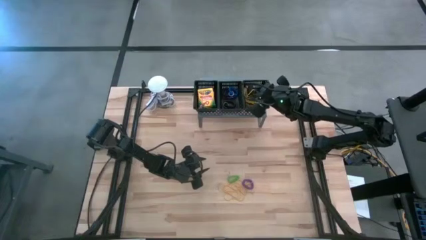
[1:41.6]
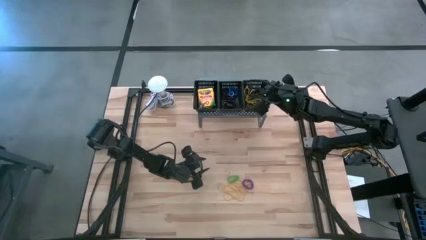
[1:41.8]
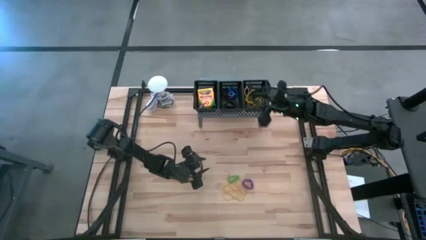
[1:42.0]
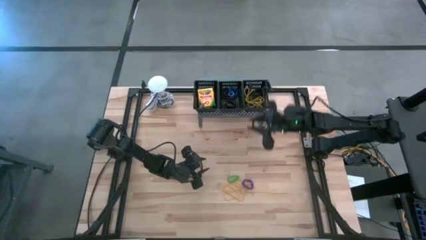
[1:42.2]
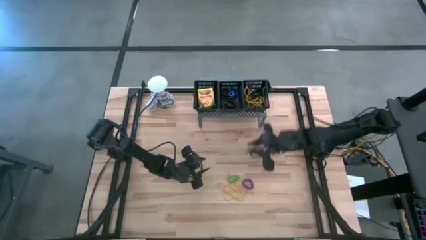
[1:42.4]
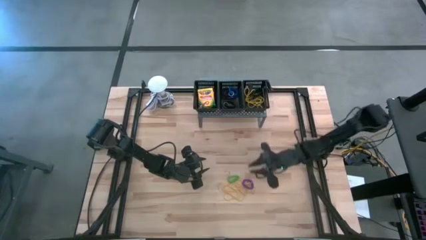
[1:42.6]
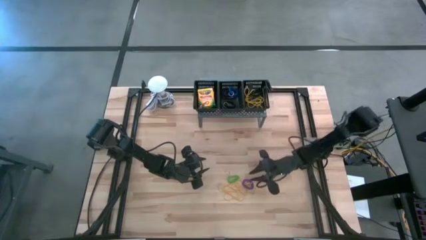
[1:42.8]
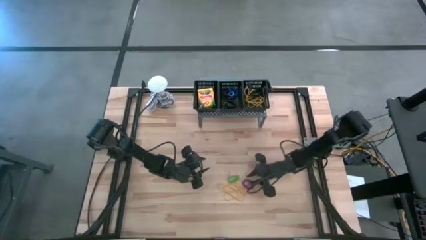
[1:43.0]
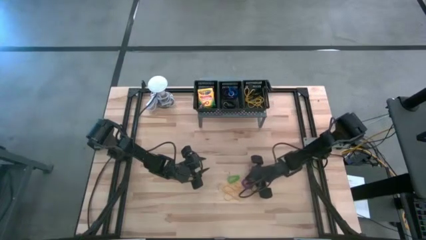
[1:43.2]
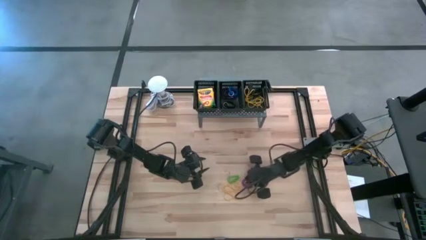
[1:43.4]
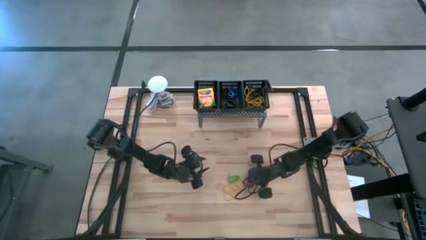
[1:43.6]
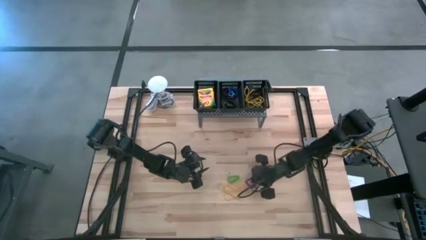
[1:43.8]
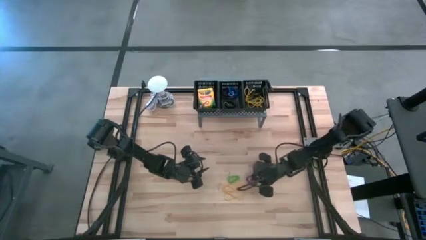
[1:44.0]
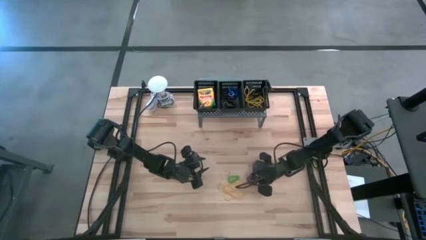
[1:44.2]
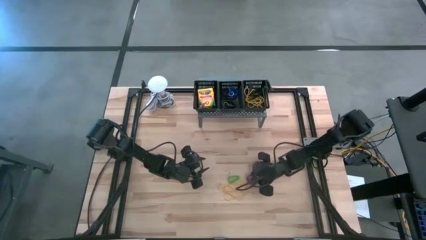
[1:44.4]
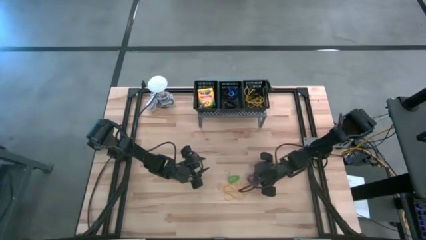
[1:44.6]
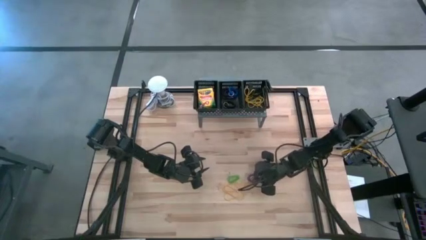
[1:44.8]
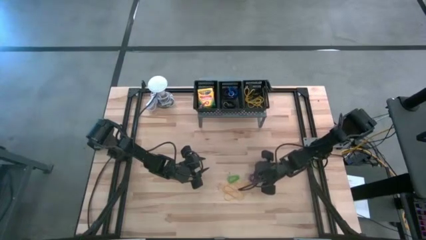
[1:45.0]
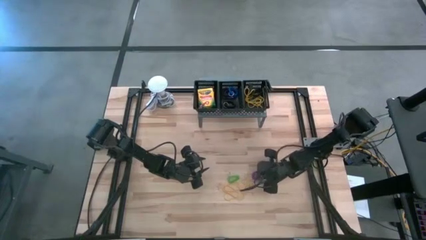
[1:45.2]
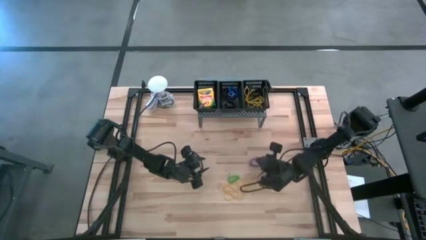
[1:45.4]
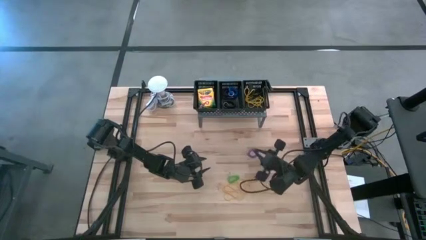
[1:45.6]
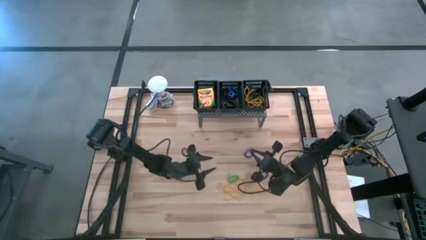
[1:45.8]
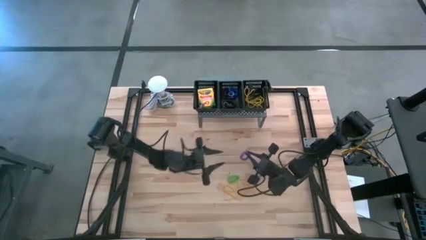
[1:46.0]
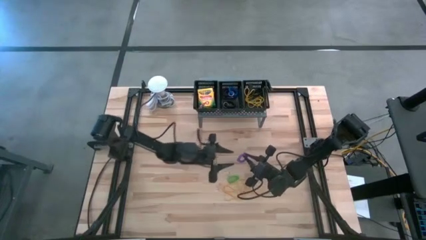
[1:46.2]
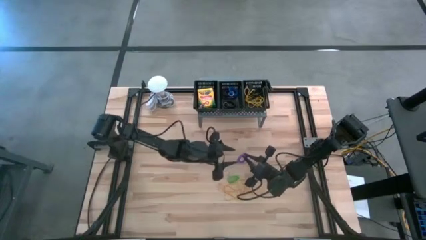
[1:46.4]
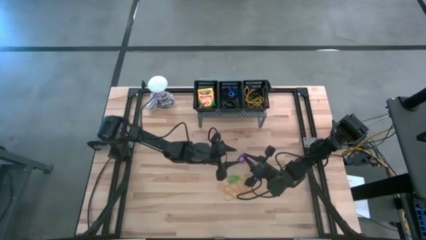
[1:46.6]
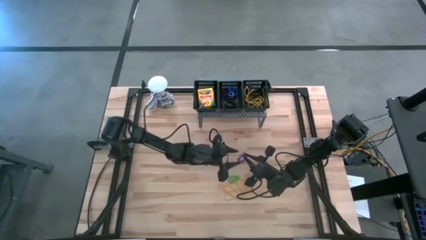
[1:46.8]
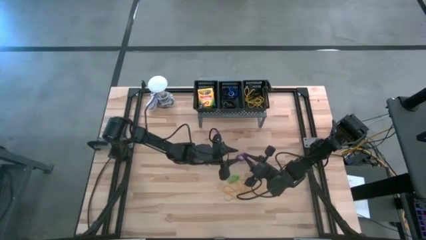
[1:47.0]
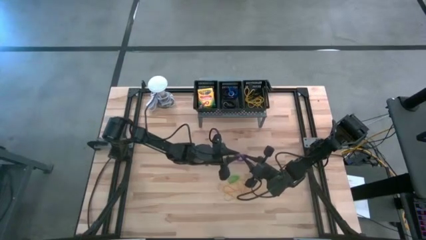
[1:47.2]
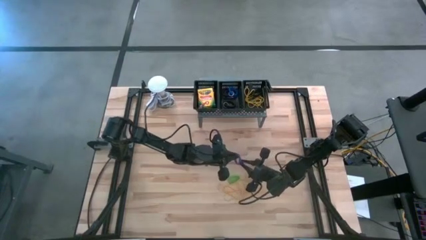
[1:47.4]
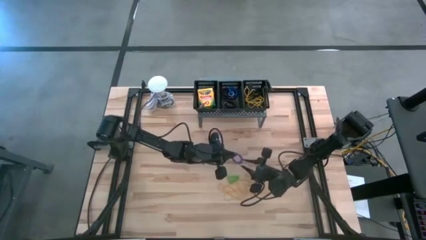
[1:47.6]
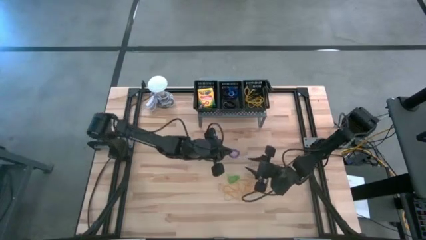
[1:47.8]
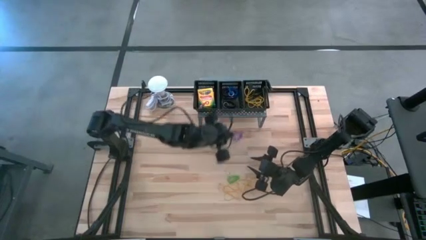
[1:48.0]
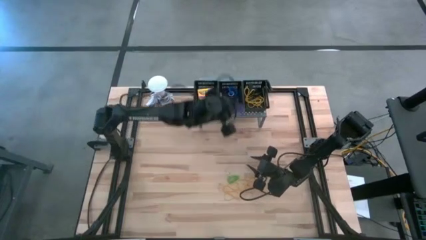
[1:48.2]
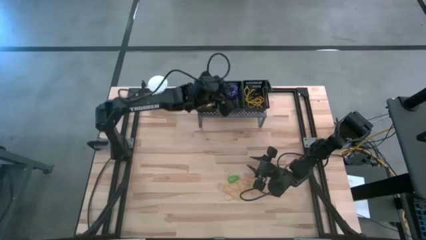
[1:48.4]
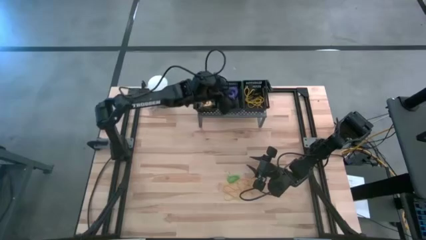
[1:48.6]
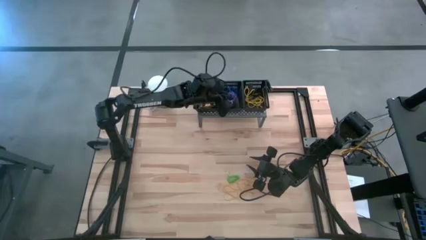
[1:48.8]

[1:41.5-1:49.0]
Task: Pick & Place Office Desk Supplies
Put the violet spring keychain into the middle black bin on the shelf

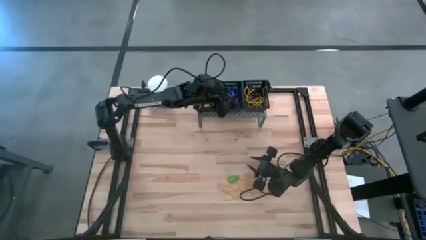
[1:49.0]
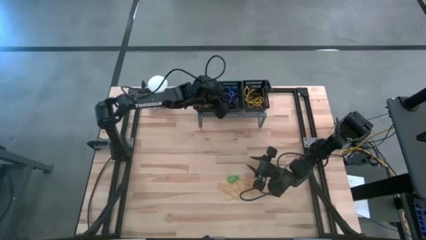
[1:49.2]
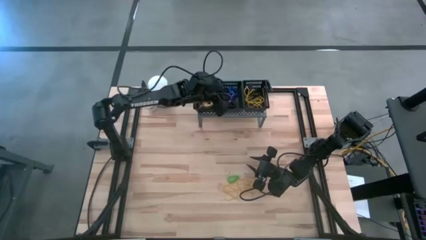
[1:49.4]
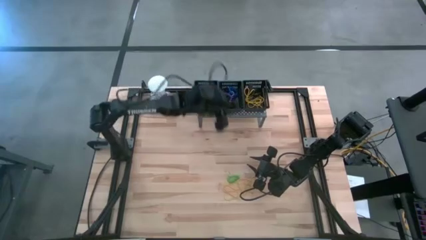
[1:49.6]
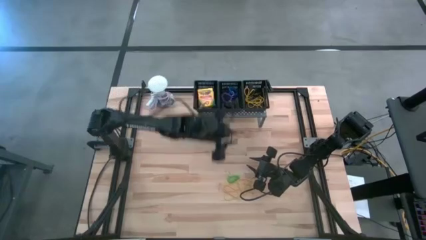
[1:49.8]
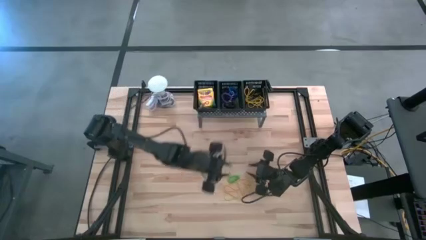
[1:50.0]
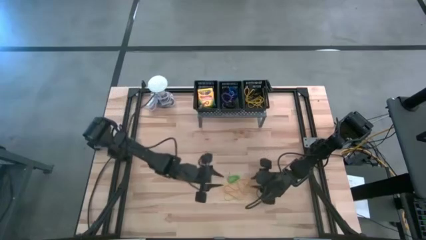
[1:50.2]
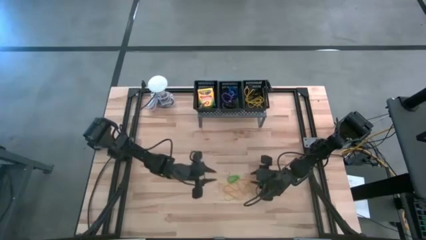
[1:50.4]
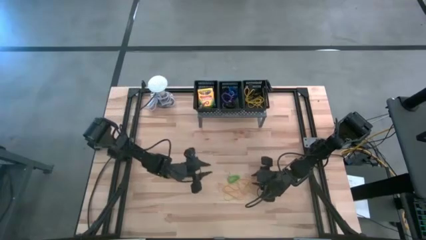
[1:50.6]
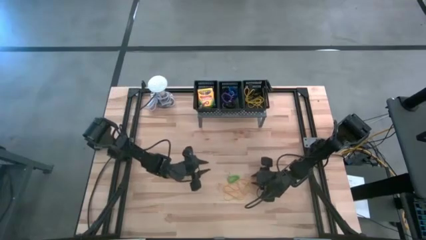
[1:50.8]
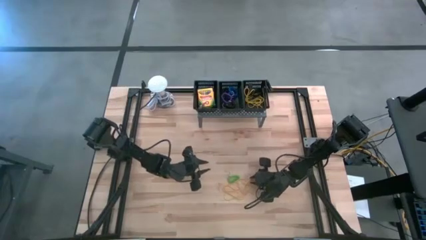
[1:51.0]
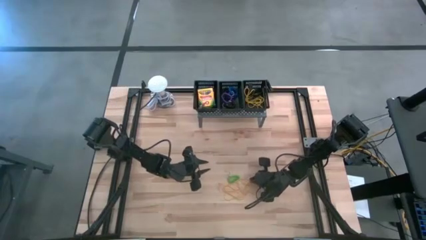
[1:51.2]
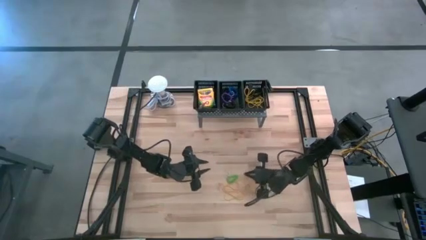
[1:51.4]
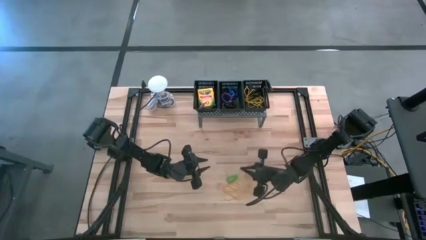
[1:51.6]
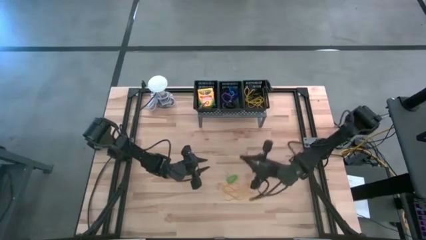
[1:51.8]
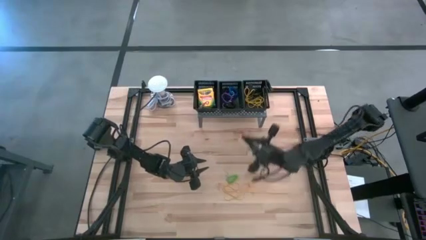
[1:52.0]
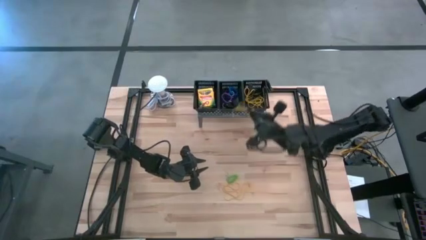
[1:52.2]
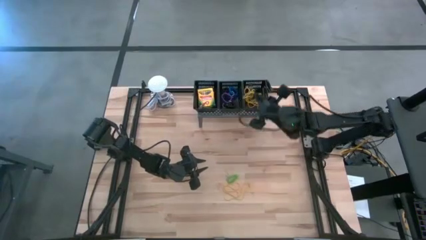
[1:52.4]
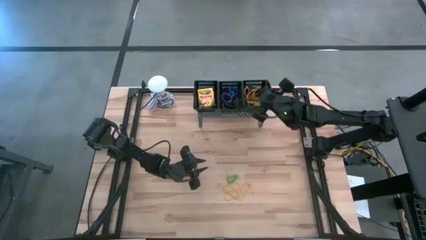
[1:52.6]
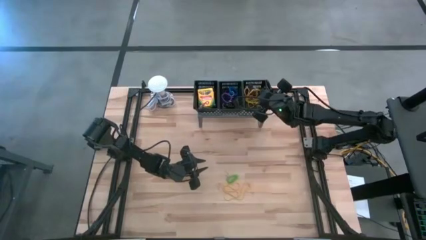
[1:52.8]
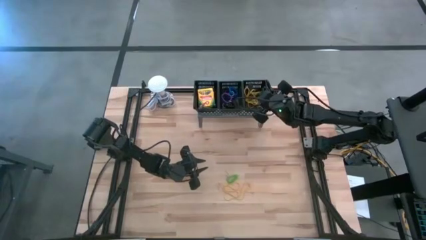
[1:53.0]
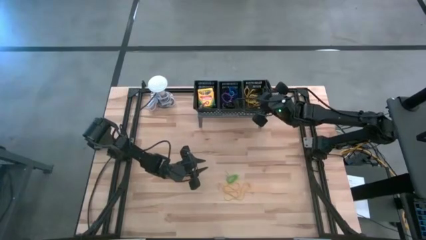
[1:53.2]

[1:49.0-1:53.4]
Put the yellow rubber band into the right black bin on the shelf

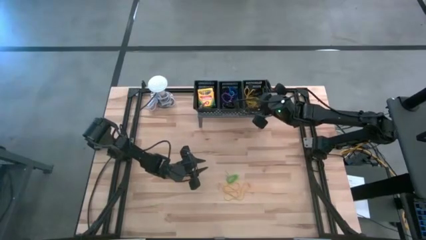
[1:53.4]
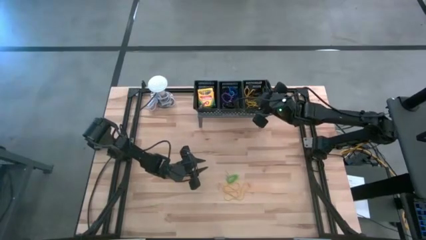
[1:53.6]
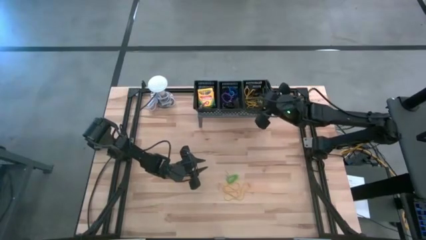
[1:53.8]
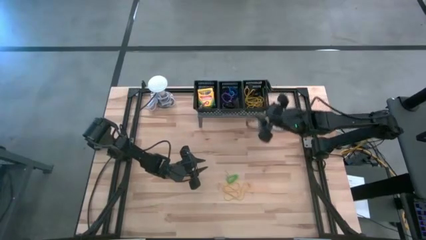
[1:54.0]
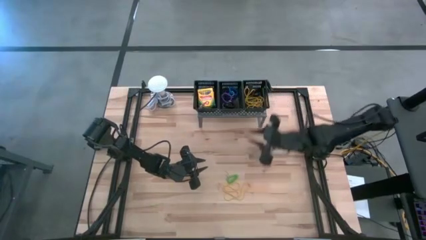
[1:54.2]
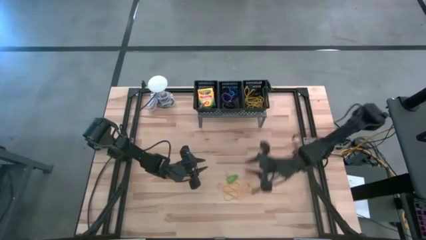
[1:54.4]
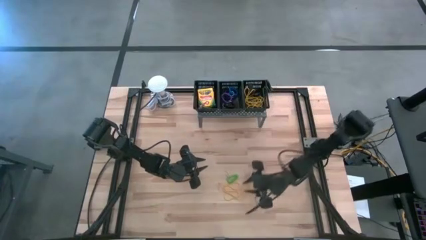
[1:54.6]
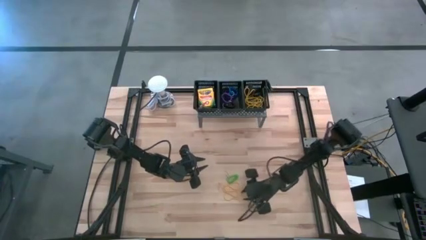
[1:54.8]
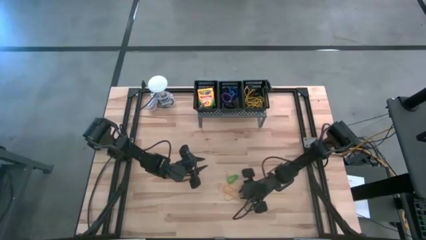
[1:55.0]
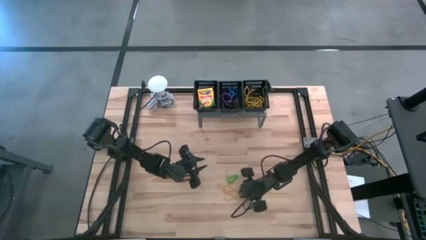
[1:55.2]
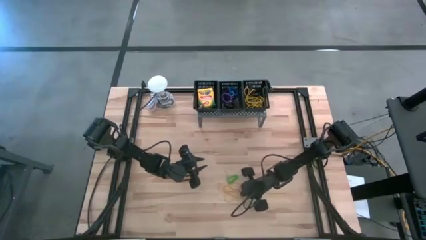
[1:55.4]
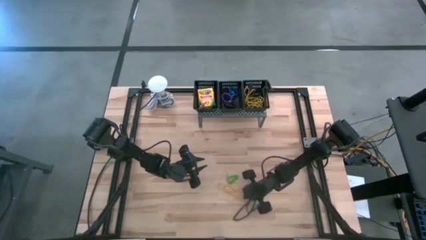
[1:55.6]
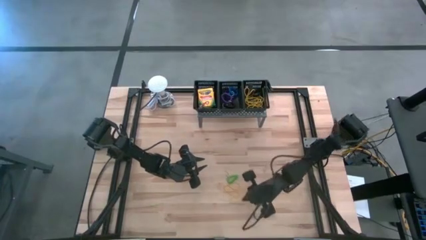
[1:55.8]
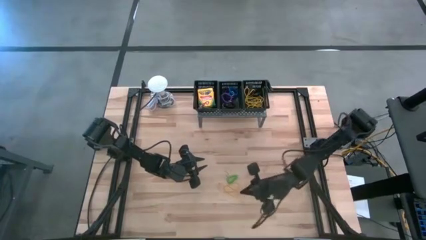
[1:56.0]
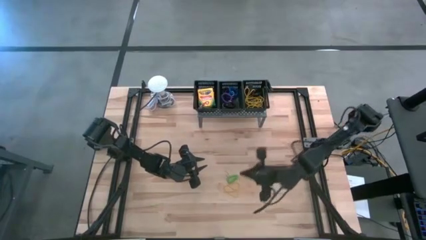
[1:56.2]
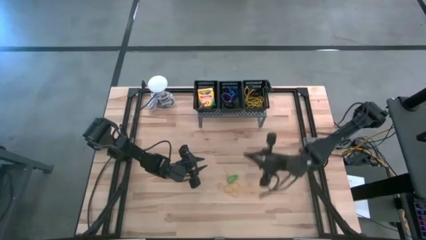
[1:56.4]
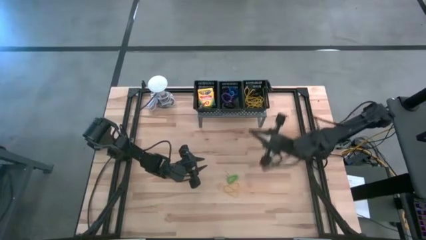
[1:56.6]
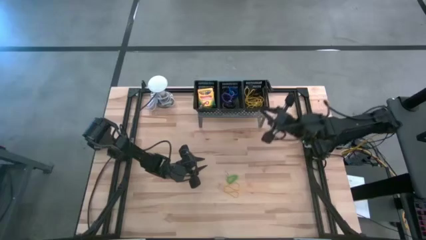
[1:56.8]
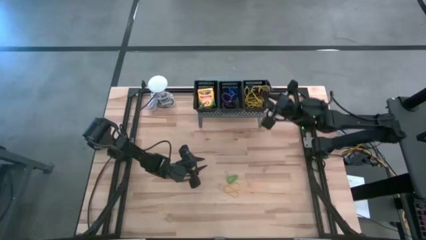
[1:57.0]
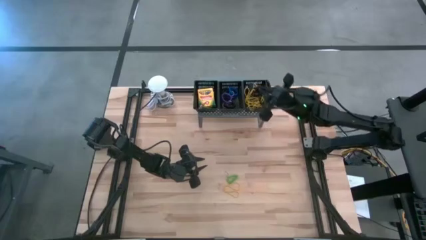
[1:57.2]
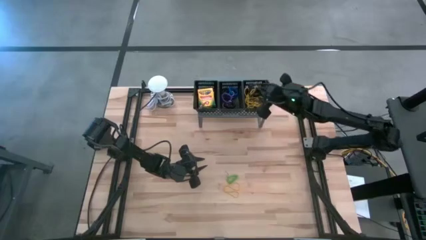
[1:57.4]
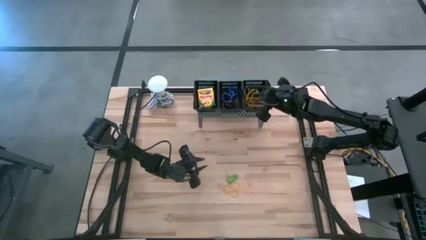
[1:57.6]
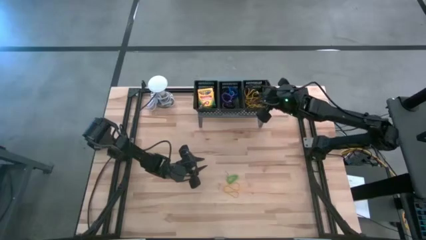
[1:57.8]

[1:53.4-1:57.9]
Put the yellow rubber band into the right black bin on the shelf

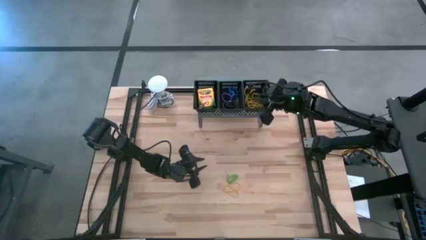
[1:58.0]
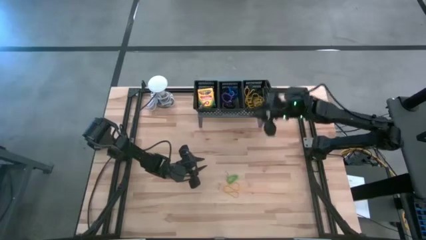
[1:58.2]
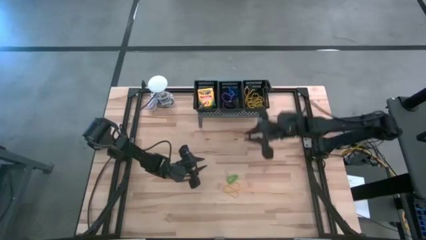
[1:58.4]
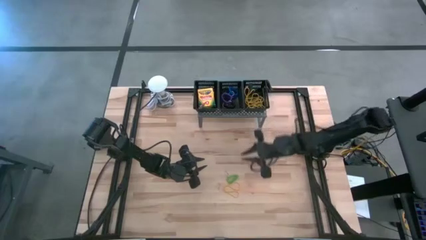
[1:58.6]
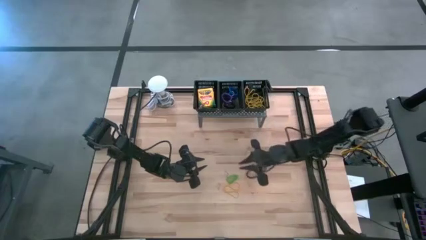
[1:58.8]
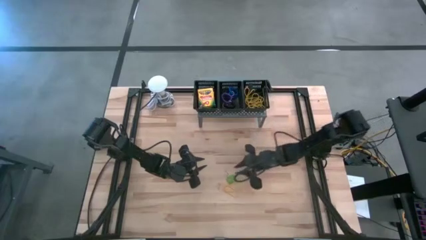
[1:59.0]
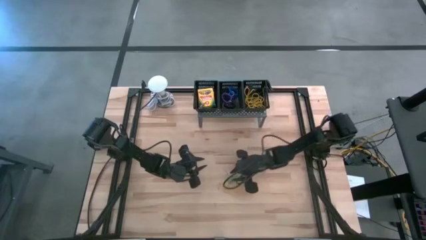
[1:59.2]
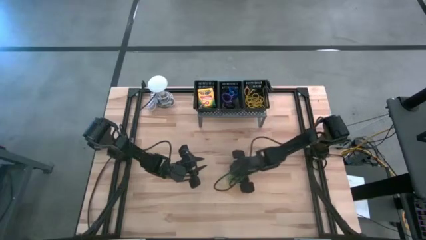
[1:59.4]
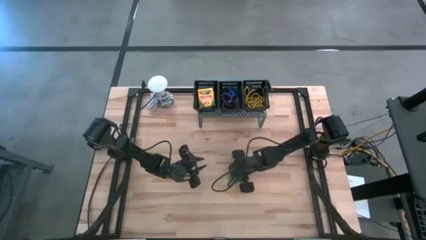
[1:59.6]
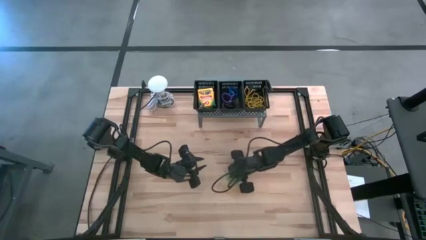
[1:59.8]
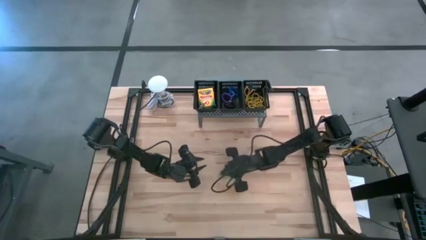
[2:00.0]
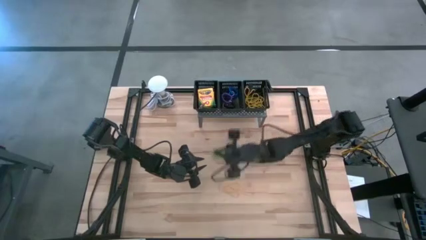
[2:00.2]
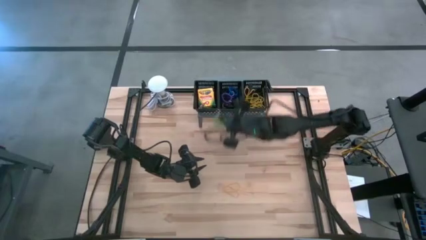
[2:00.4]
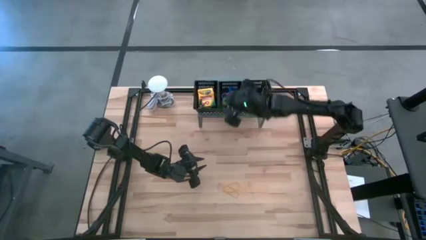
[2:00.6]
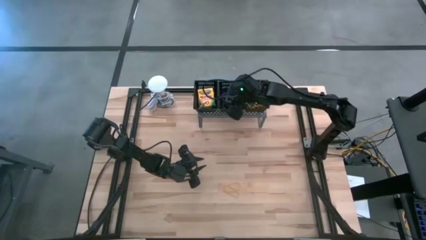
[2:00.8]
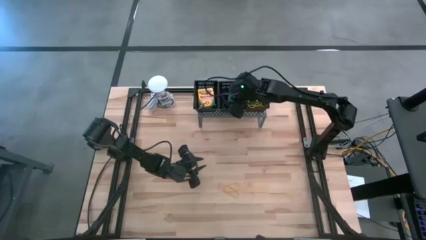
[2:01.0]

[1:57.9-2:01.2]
Put the green spring keychain into the middle black bin on the shelf
